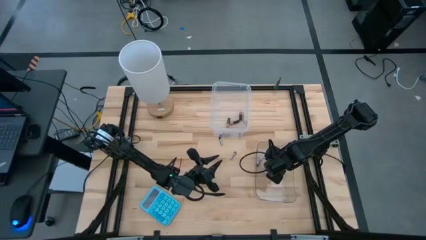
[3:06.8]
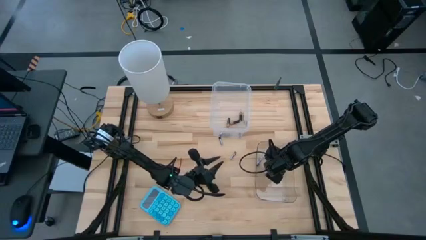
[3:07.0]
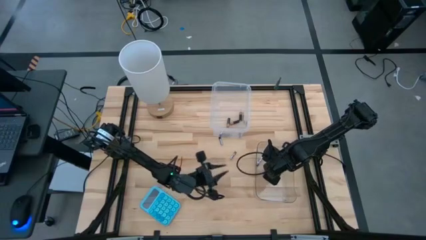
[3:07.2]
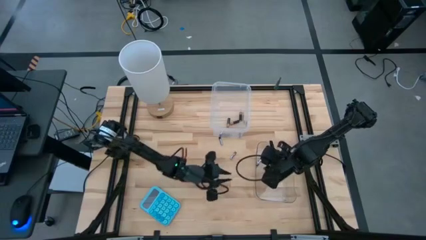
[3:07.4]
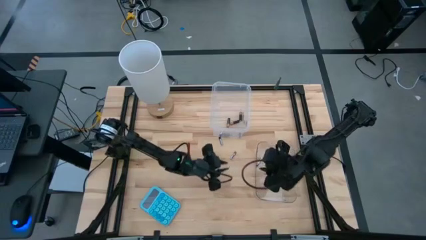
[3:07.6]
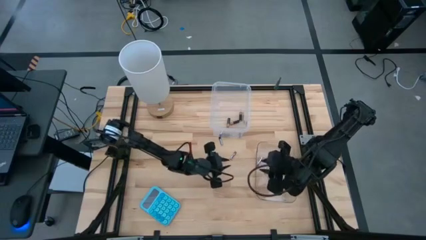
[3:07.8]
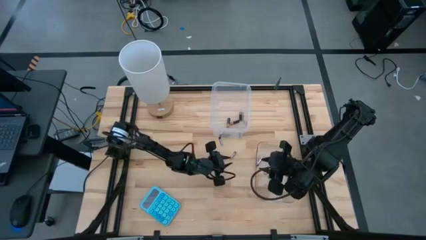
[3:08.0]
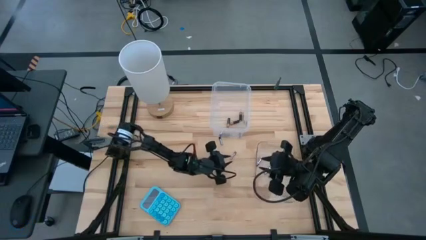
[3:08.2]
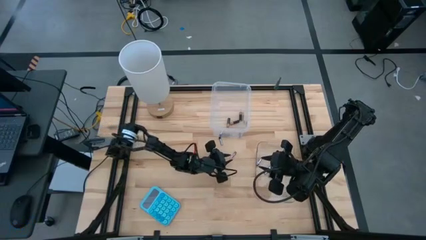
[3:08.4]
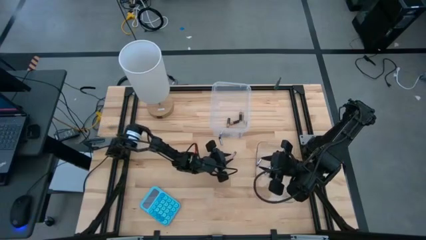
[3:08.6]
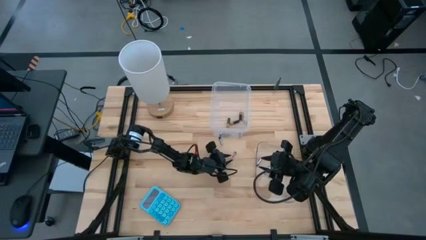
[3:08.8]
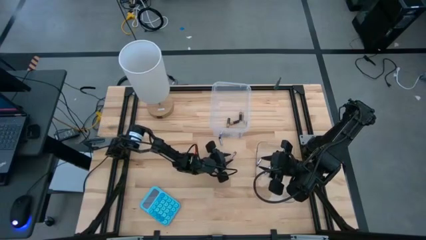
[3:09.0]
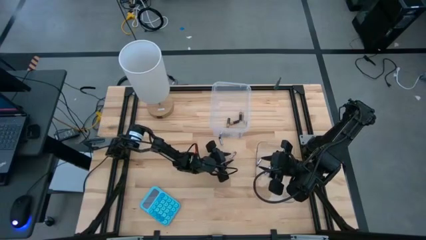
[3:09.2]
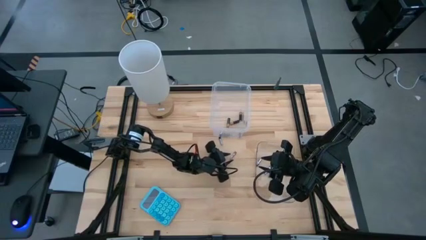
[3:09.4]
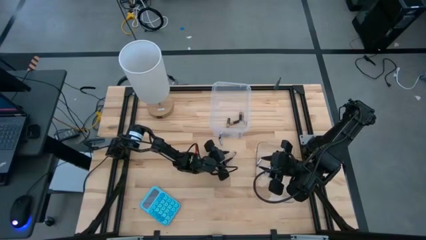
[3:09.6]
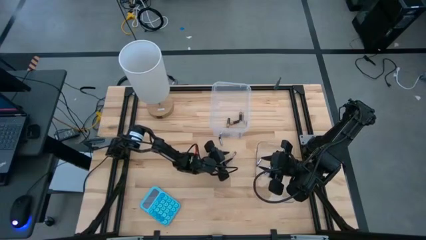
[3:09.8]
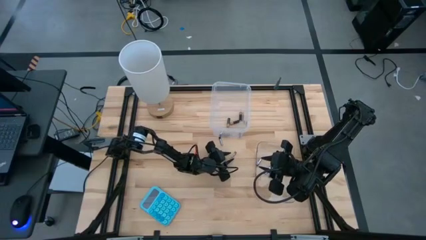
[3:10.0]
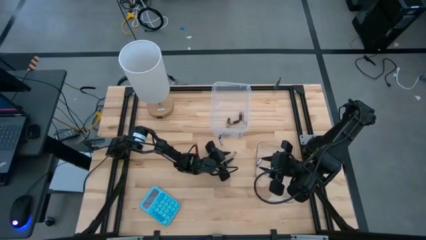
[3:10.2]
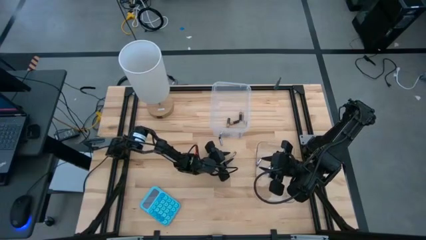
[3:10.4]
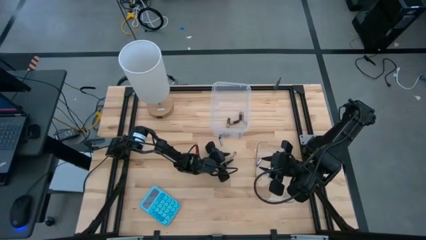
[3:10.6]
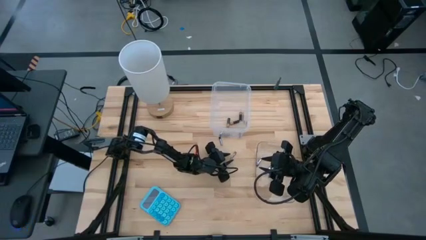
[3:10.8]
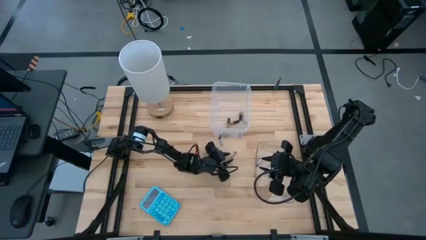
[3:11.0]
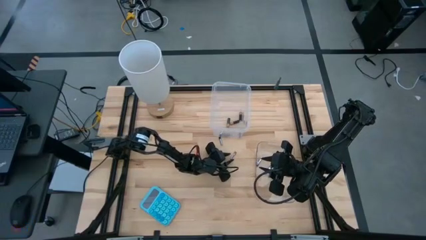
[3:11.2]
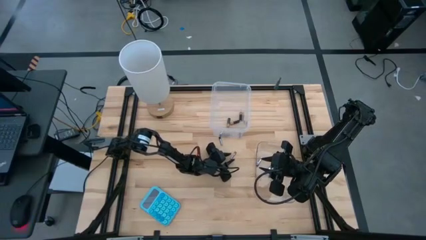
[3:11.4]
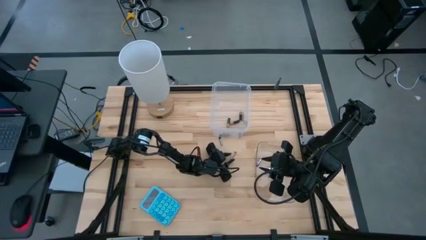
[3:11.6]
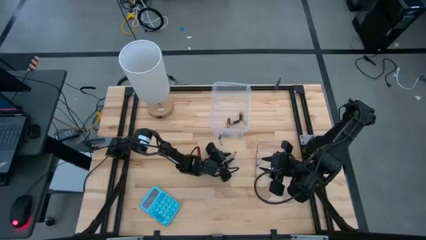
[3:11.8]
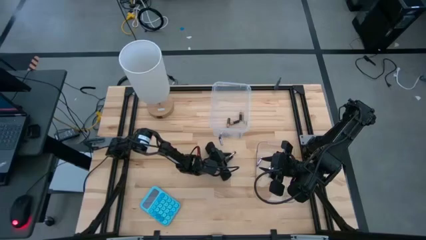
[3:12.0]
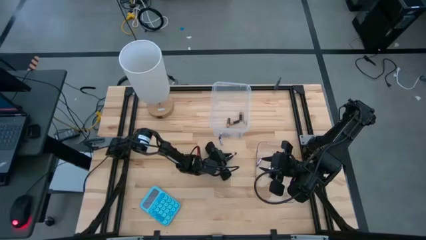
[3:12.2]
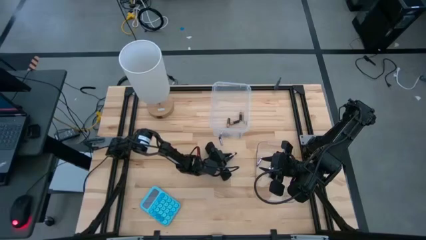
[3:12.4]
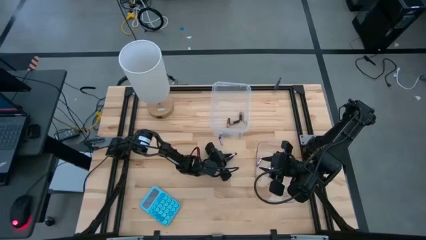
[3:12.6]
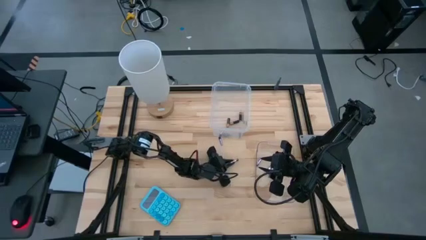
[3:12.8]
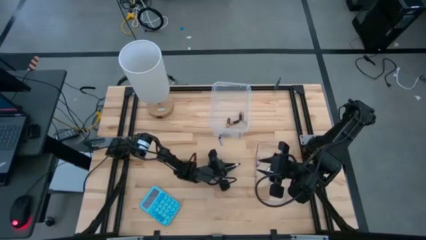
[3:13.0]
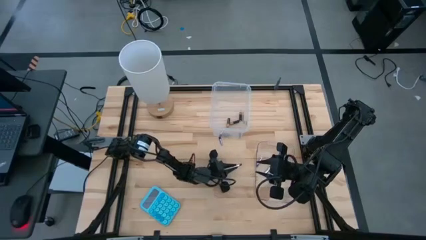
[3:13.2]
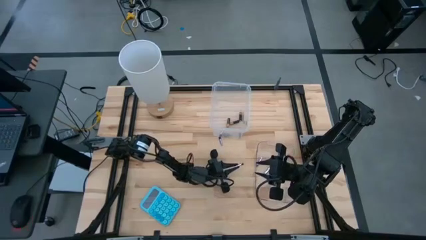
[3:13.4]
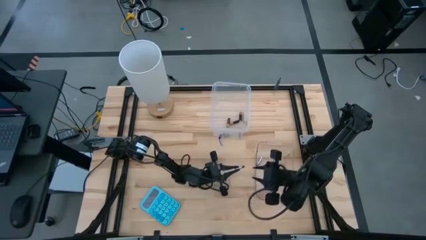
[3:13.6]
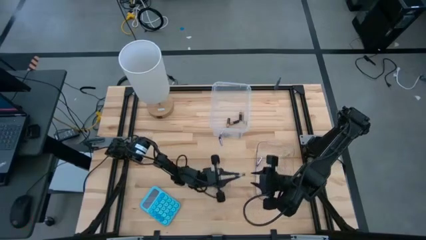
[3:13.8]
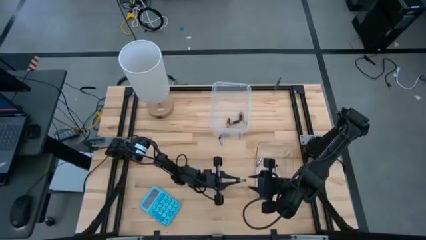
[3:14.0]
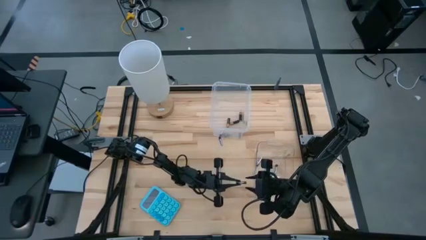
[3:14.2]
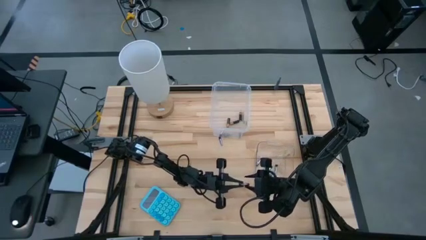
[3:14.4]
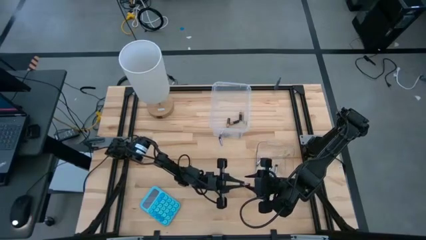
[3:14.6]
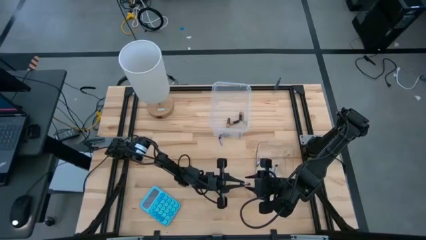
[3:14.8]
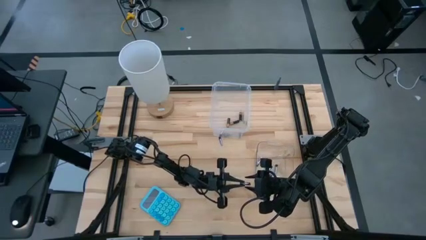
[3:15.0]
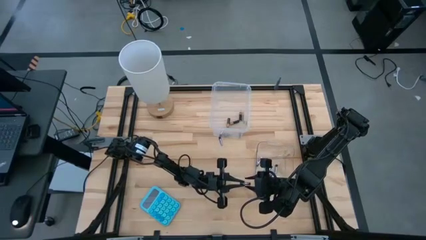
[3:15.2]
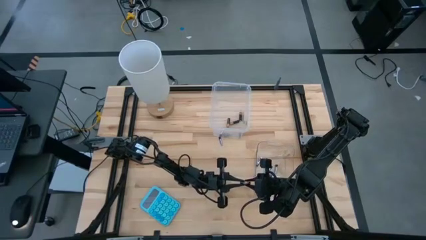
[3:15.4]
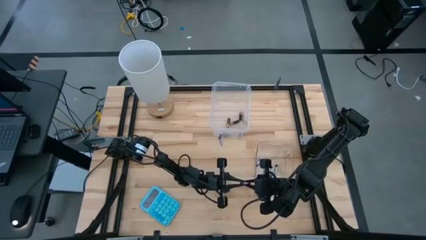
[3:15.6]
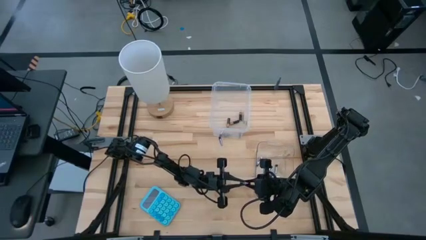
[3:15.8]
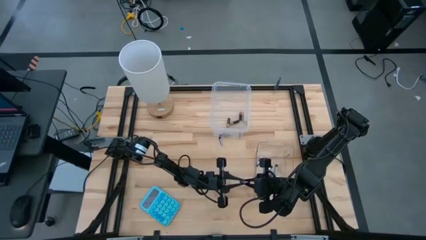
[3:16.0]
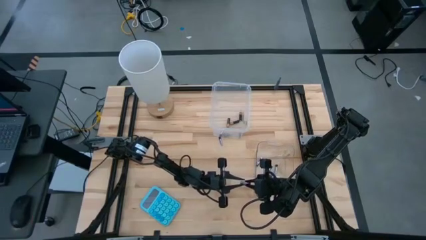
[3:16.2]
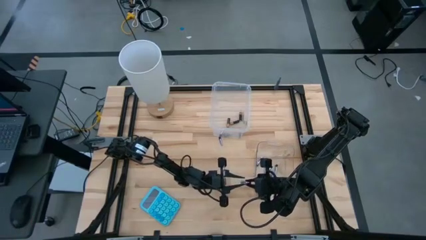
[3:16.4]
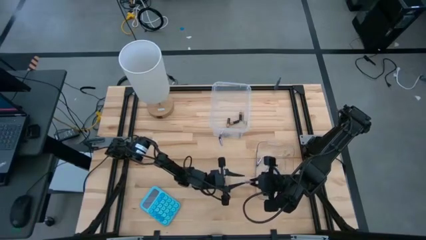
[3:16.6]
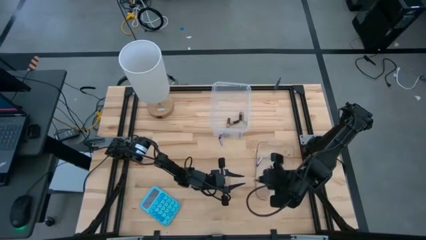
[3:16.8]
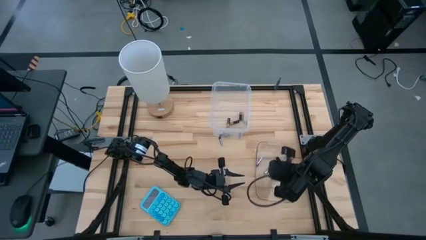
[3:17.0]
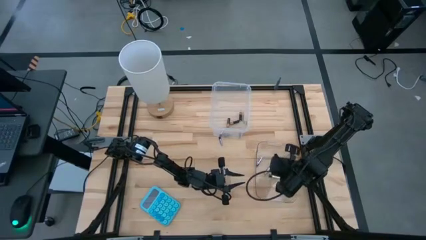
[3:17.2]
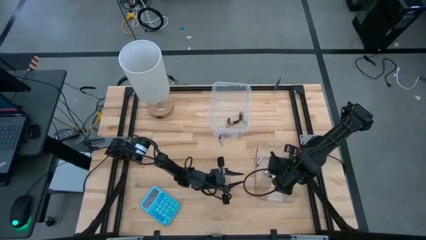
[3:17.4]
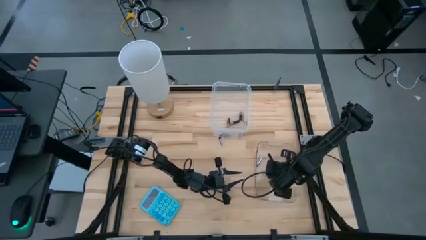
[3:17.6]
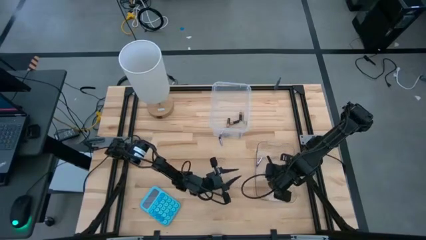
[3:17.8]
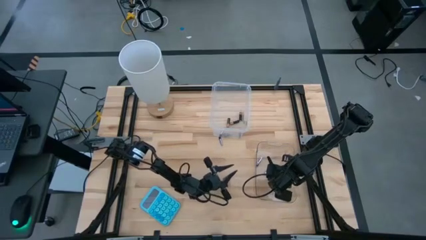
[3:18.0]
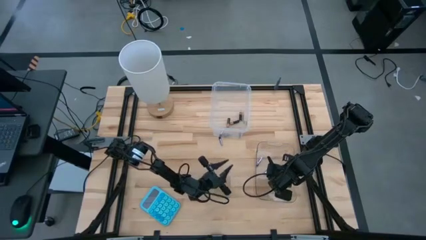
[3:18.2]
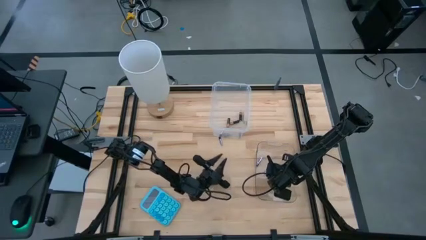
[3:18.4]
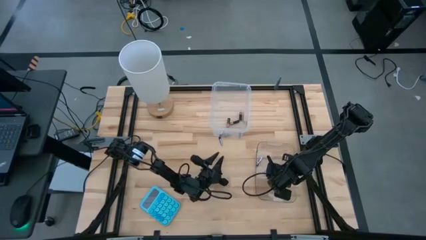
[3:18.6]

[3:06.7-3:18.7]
Task: Sort batteries
Put the silver battery into the bottom transparent bin

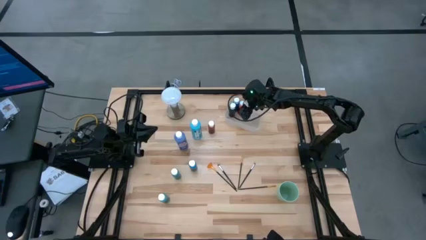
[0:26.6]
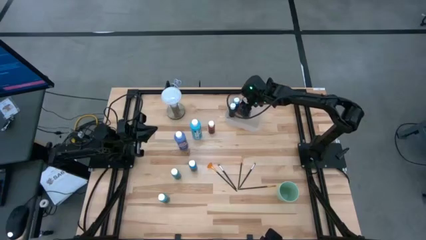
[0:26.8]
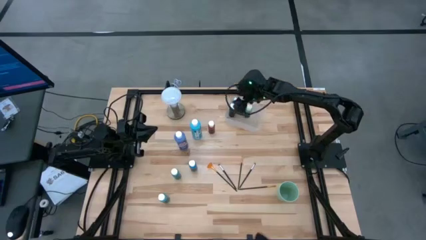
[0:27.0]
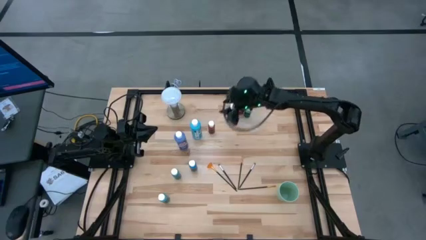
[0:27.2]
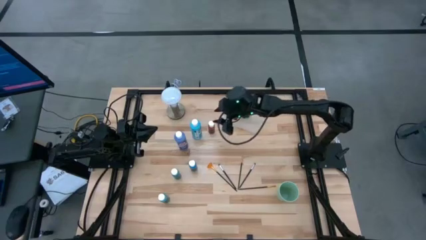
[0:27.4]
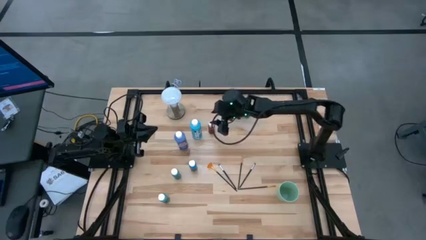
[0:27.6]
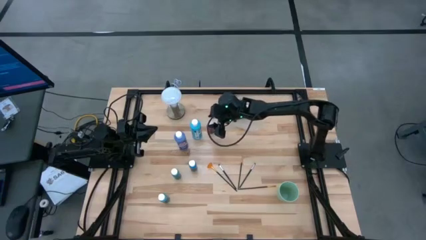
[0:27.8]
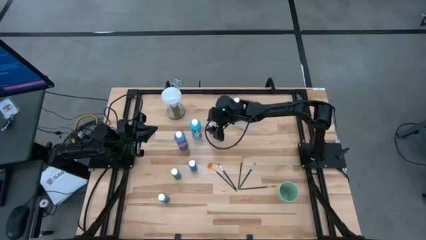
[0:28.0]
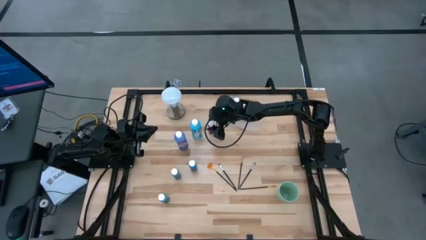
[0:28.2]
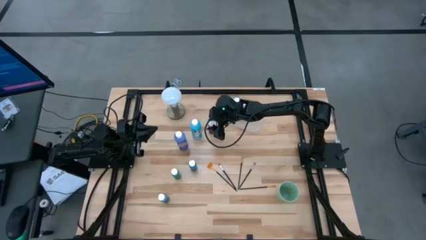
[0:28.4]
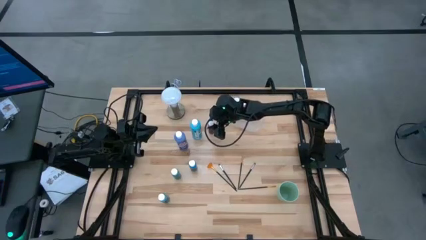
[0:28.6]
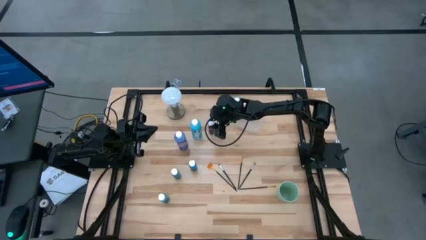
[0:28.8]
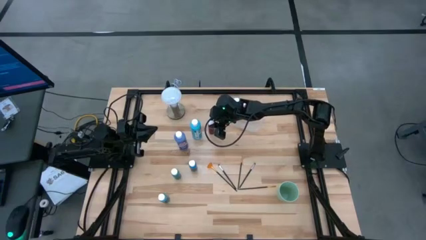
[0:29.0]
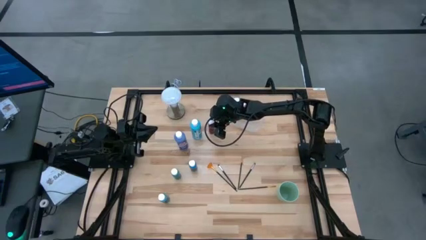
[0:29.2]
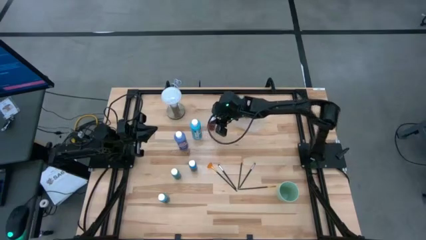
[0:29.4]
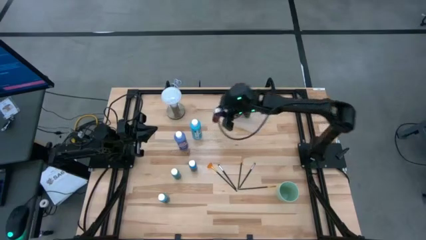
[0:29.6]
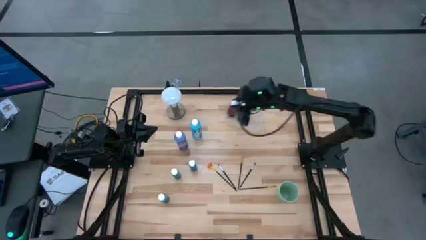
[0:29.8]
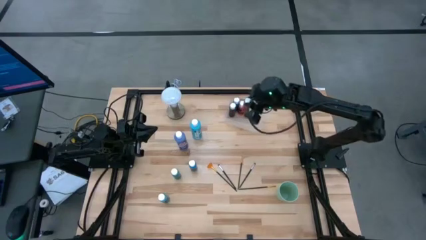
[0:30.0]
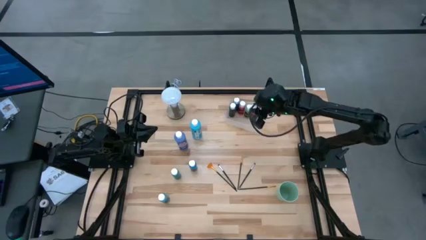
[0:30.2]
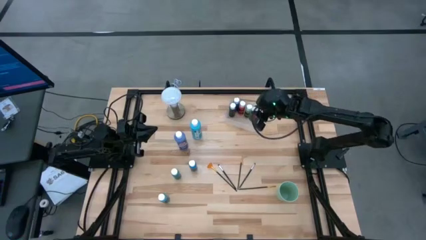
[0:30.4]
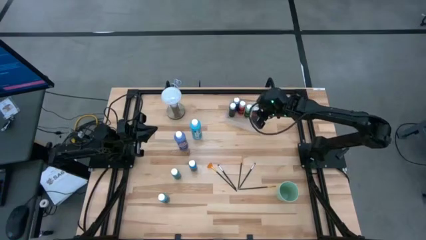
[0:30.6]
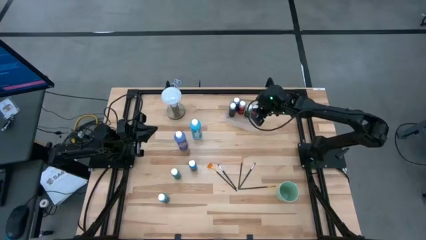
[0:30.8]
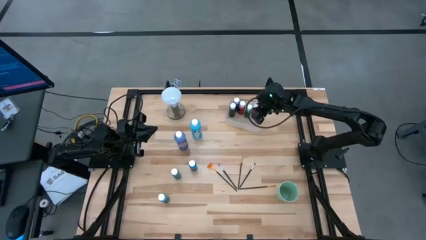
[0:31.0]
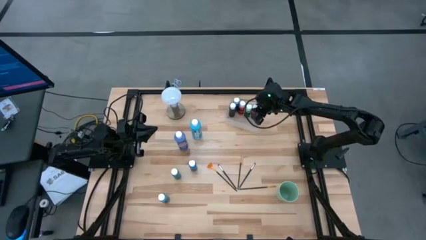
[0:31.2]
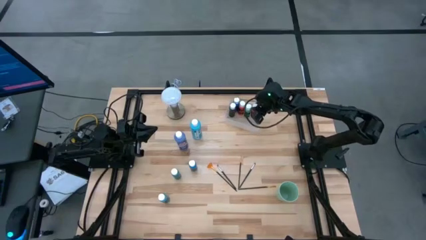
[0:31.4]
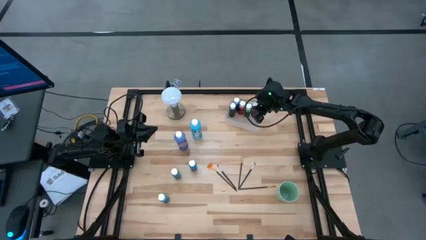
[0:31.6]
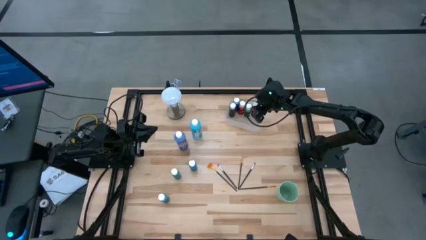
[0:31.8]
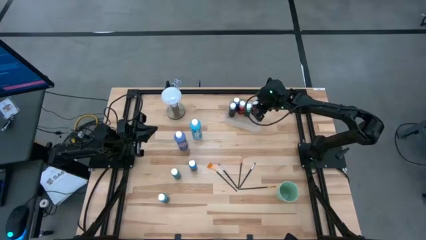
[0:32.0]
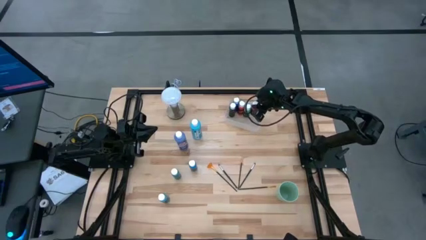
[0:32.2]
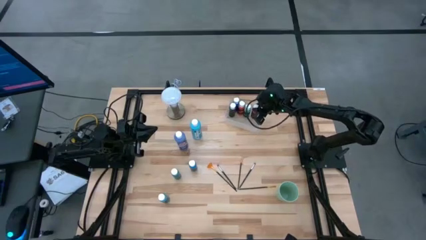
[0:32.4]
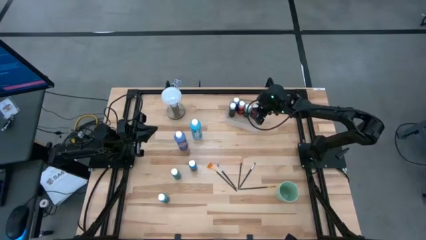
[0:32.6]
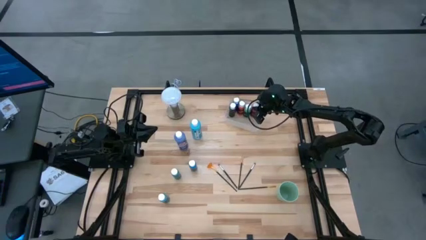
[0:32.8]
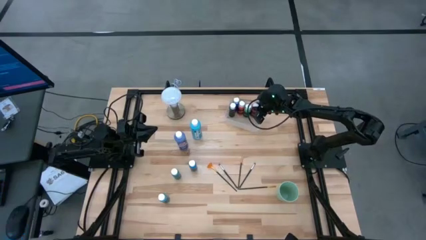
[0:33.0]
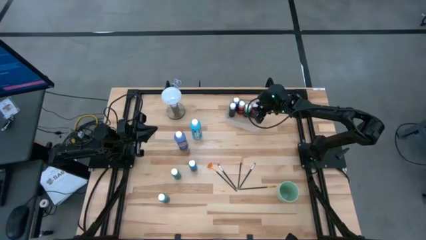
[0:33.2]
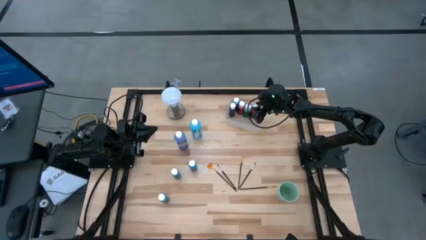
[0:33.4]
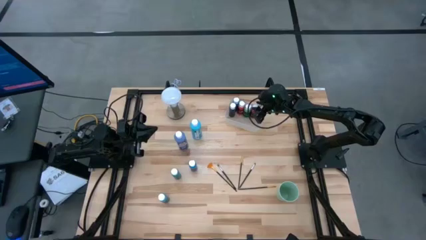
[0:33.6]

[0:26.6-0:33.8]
Task: Pick & Place Paint Supplies
Put the small dark red paint bottle into the transparent bin
